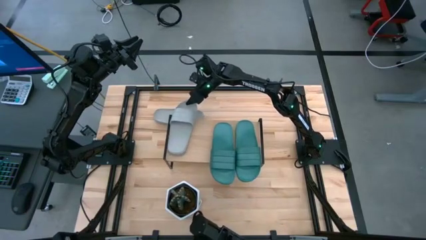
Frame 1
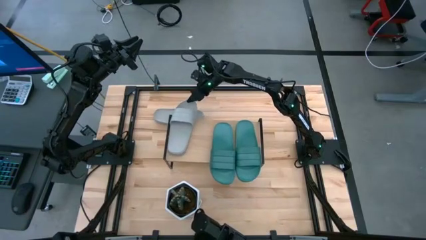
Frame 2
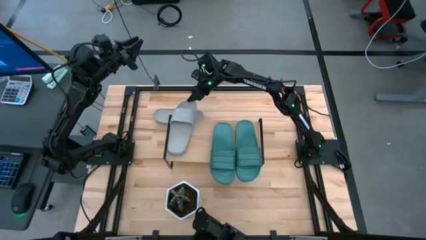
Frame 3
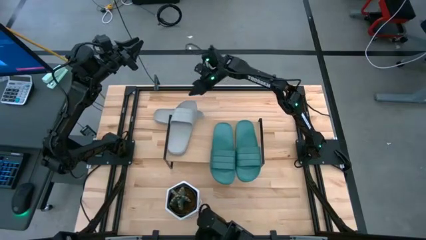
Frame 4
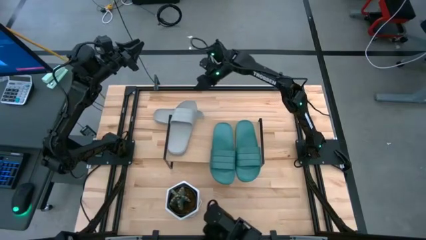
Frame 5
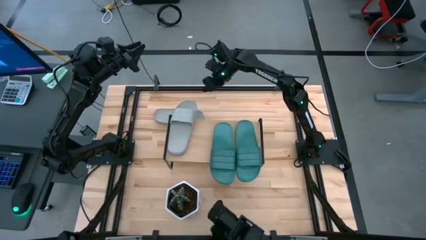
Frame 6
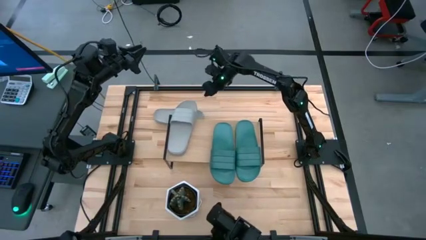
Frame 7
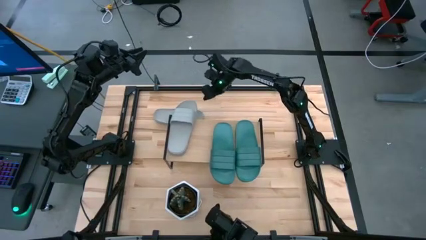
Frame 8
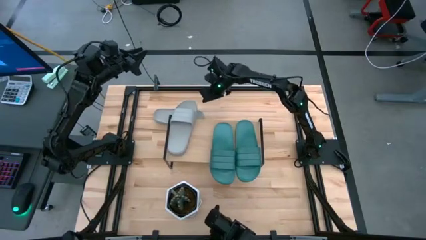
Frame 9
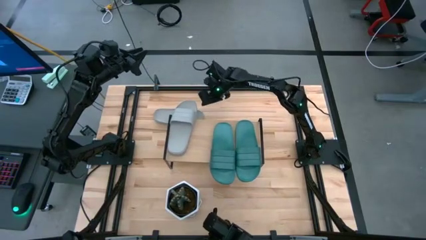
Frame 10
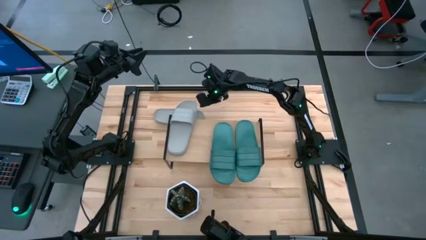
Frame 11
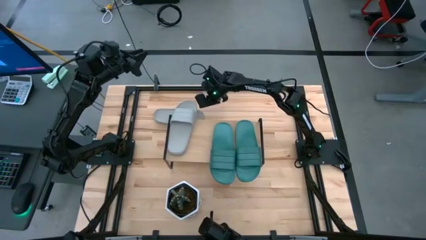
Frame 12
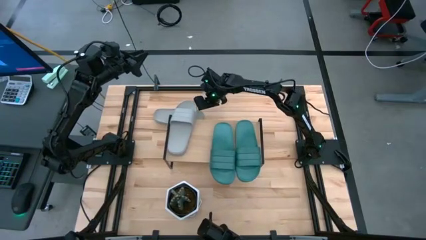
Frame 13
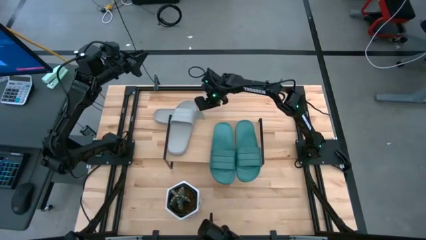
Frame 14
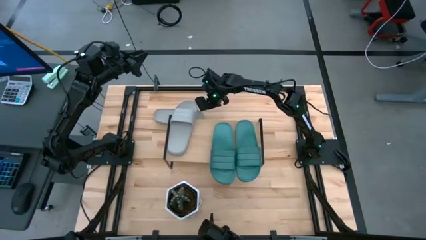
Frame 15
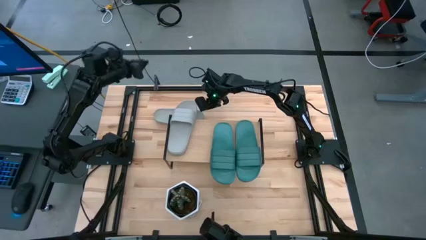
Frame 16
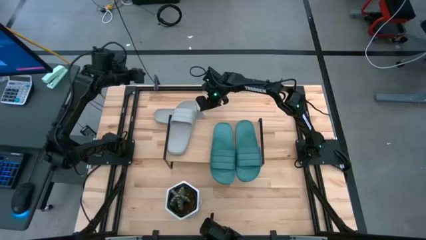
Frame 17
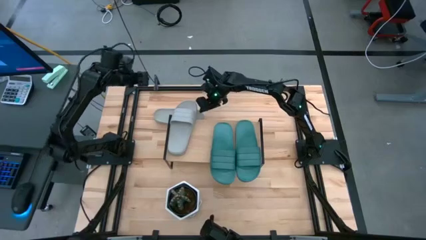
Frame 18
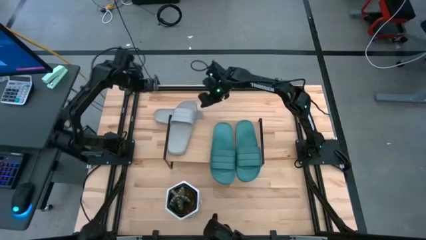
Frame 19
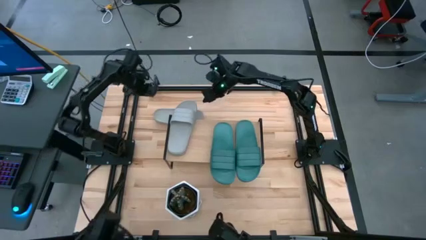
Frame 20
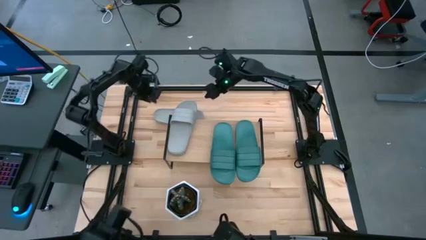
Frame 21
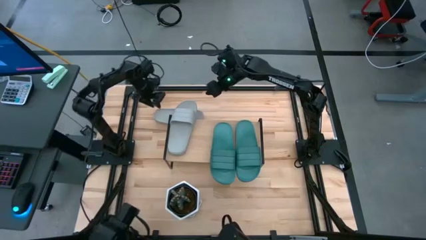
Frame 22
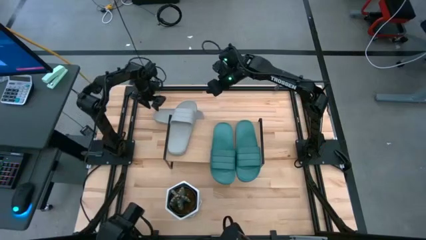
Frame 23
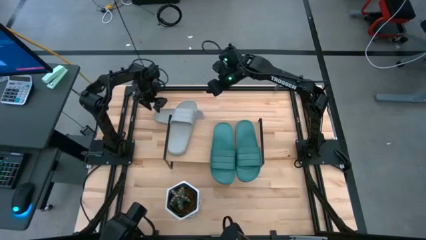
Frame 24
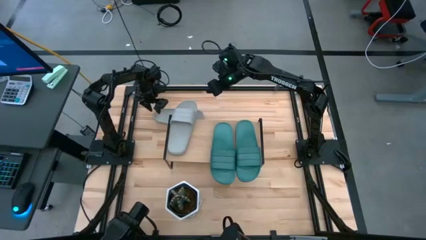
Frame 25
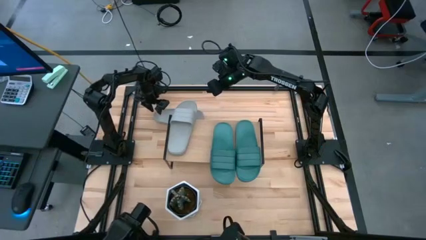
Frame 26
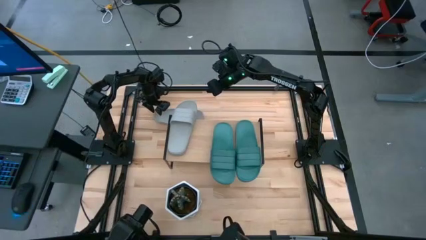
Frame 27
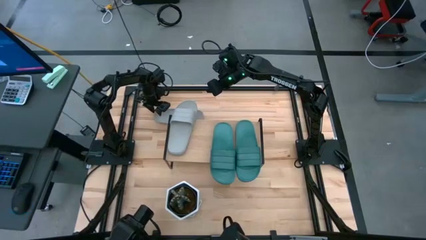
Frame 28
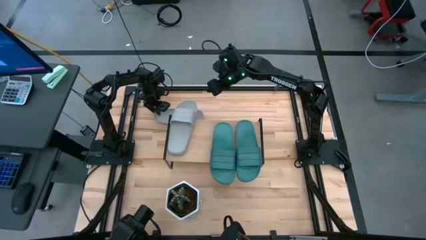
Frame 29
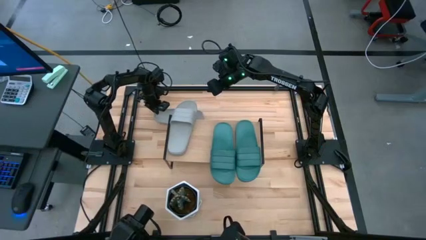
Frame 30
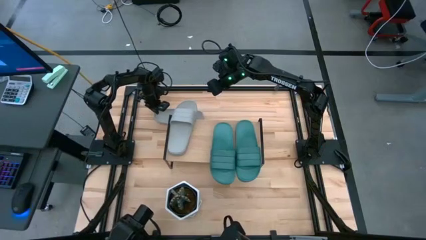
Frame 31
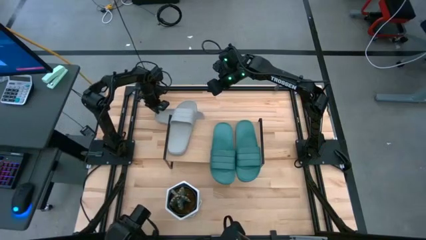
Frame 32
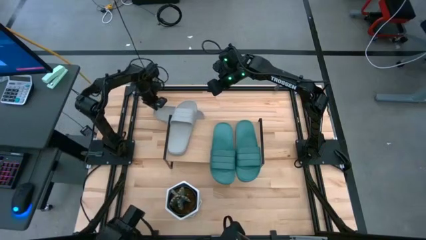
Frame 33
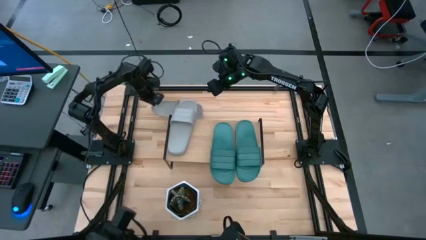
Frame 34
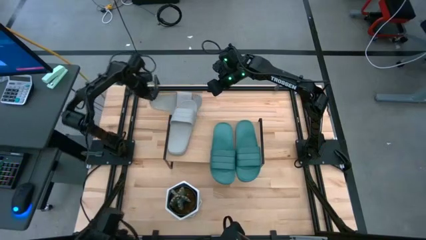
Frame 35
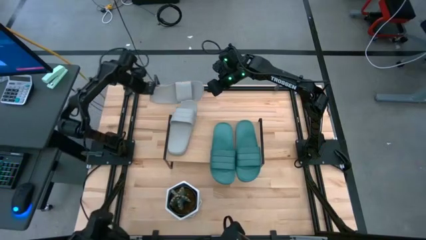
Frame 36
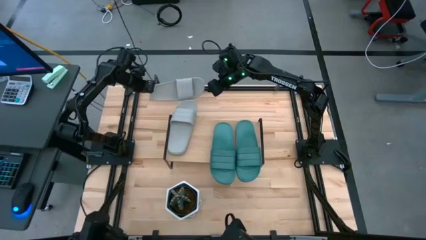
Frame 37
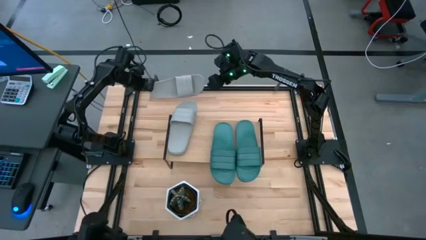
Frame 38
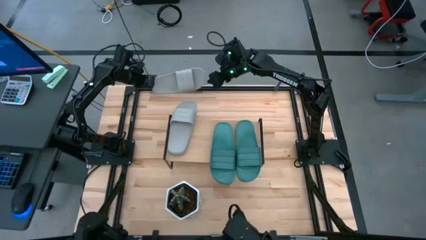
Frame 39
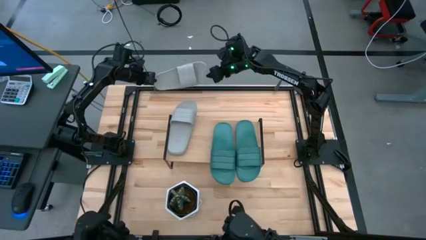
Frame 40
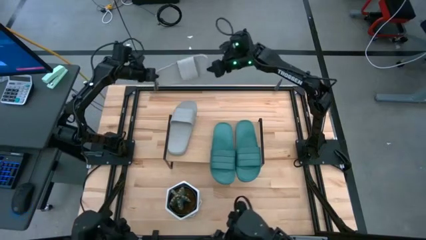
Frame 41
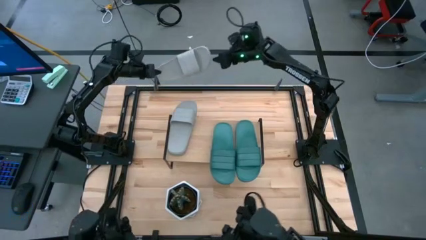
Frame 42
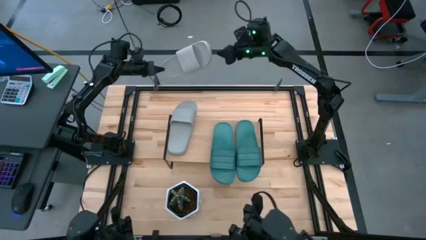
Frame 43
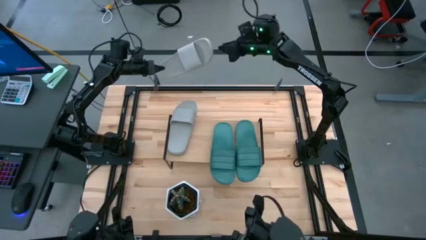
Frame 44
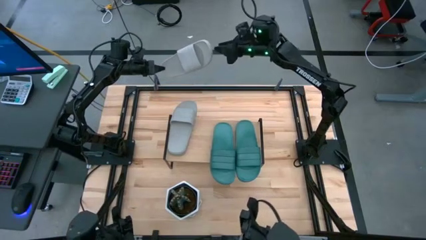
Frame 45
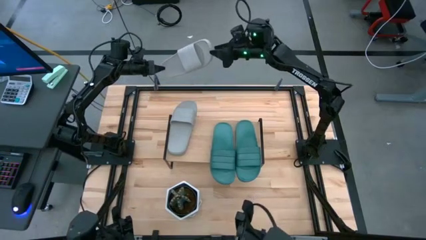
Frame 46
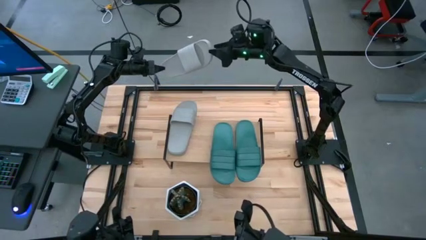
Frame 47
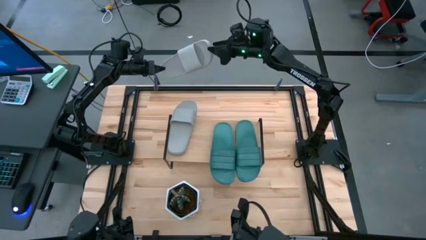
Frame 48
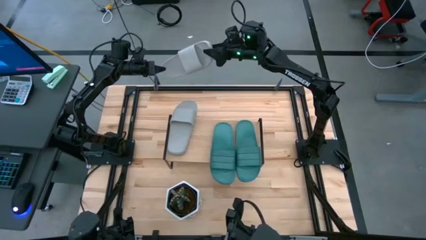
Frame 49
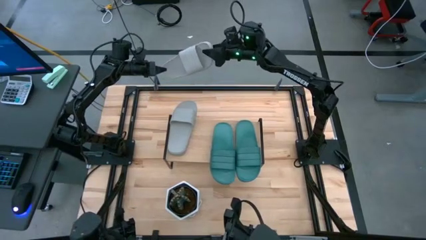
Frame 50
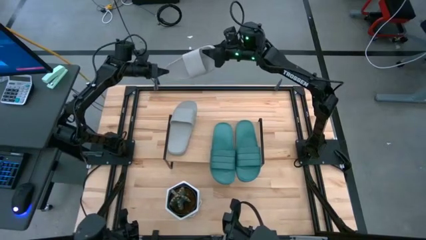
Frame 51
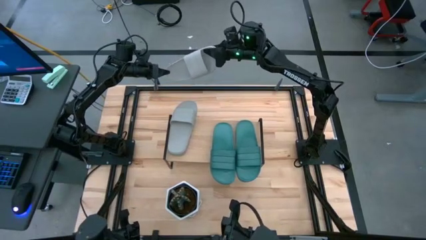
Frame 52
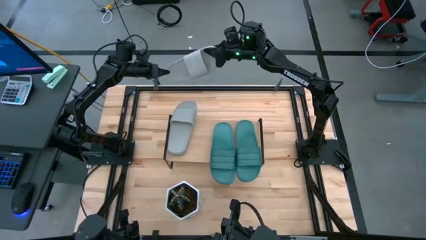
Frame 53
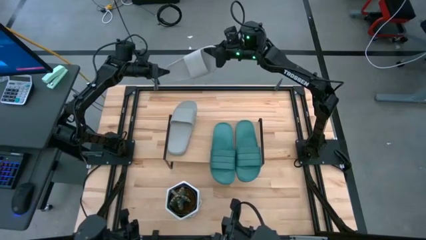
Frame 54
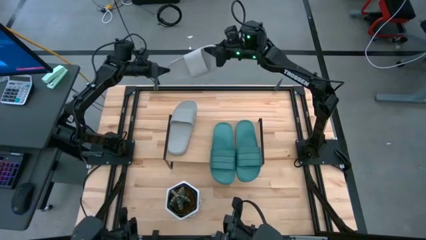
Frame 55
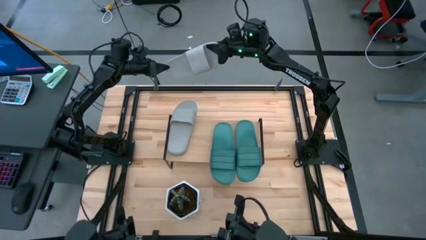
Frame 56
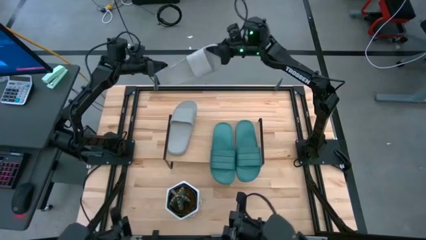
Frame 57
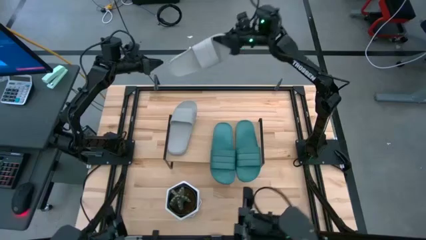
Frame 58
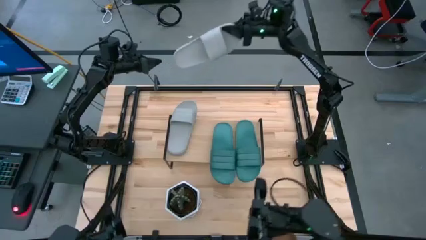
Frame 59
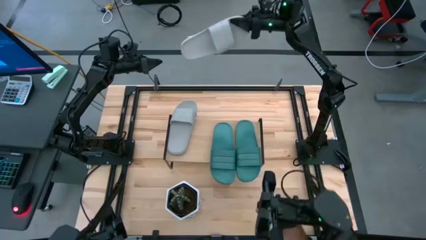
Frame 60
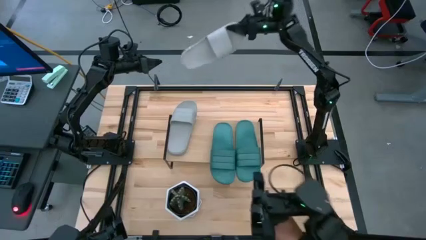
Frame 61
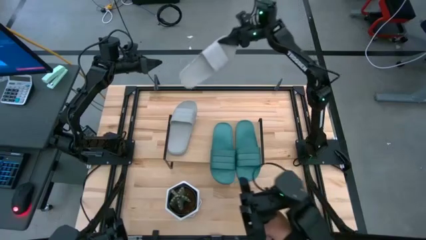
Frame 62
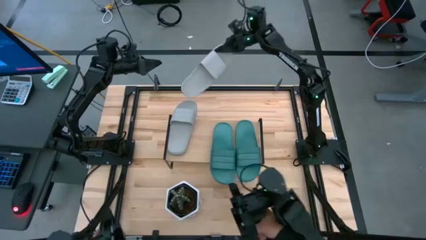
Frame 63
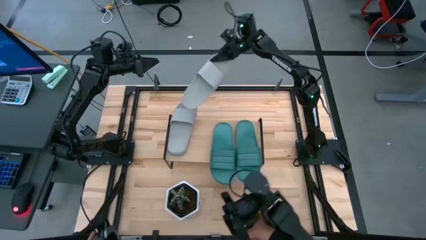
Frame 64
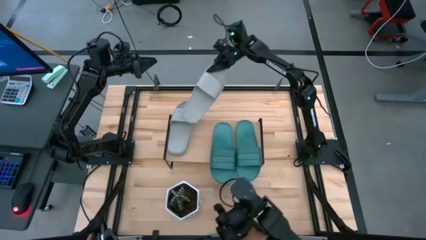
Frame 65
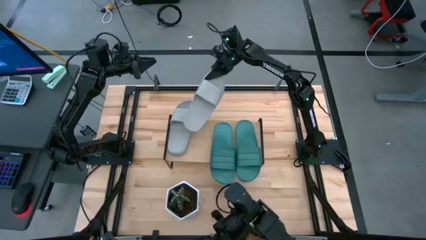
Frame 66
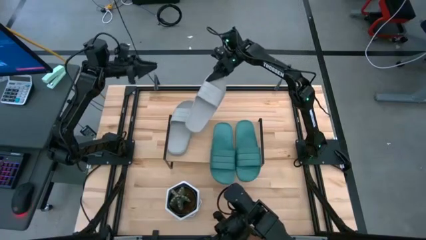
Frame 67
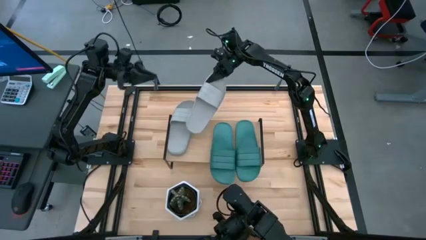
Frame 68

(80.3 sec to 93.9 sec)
Task: Pick and place slides into the shelf
Put the gray slide on the shelf

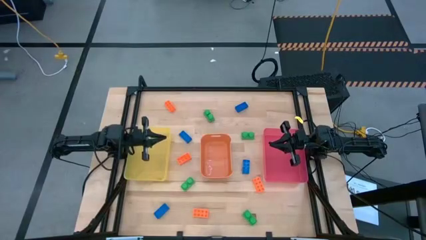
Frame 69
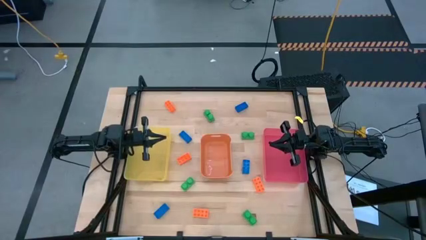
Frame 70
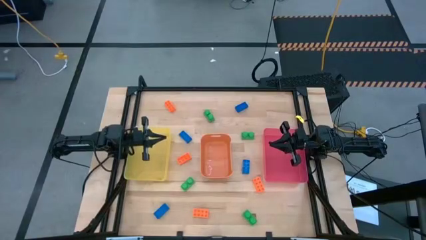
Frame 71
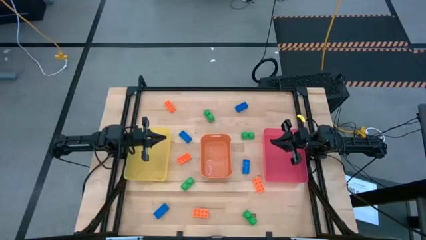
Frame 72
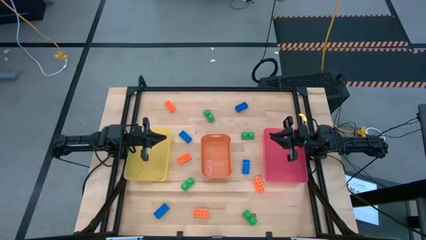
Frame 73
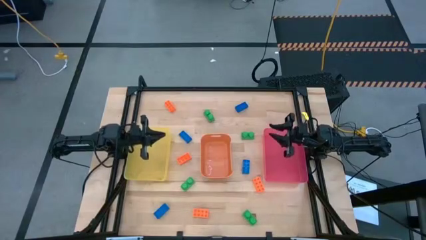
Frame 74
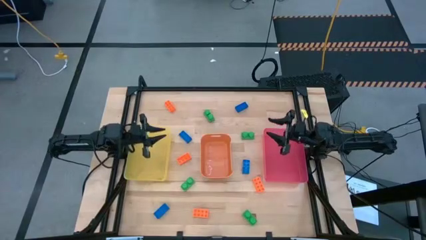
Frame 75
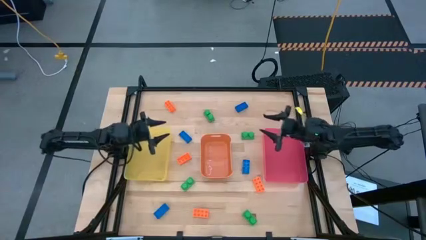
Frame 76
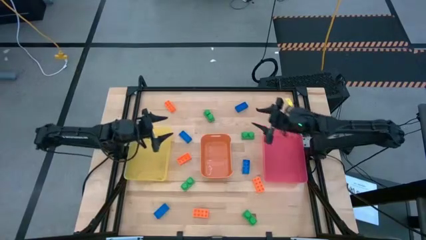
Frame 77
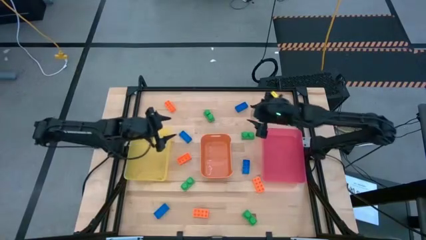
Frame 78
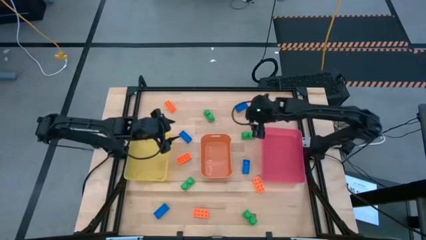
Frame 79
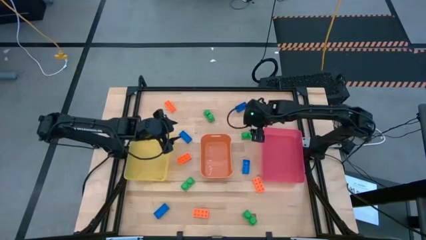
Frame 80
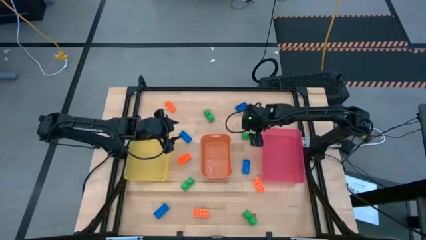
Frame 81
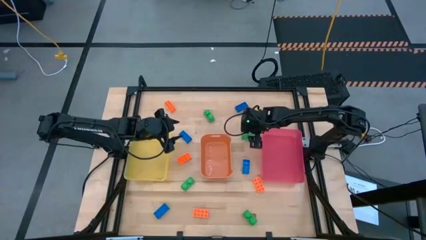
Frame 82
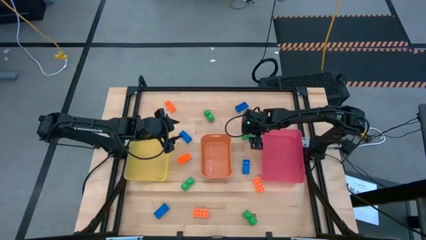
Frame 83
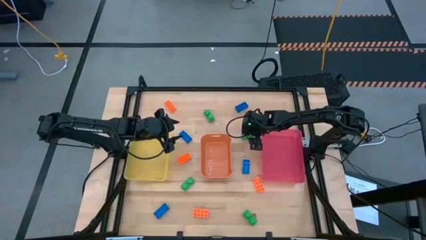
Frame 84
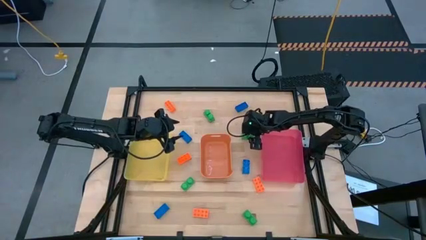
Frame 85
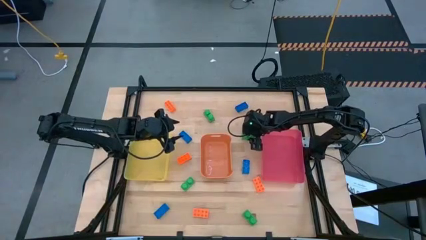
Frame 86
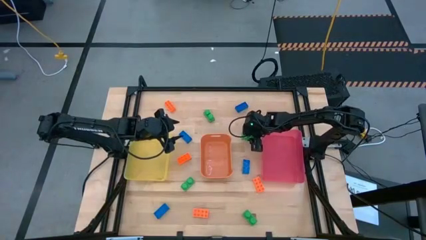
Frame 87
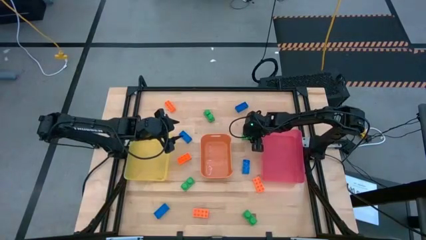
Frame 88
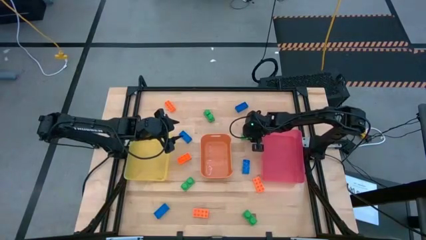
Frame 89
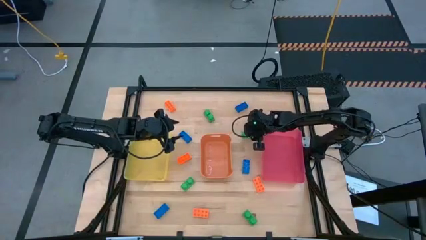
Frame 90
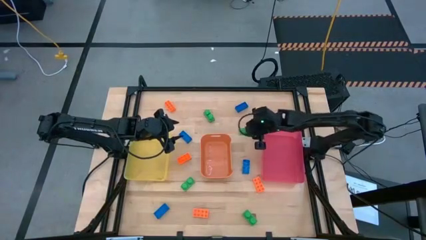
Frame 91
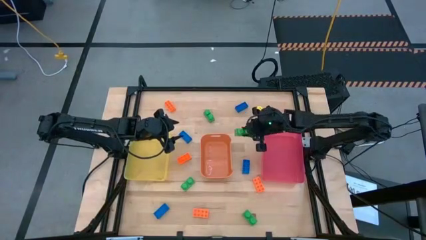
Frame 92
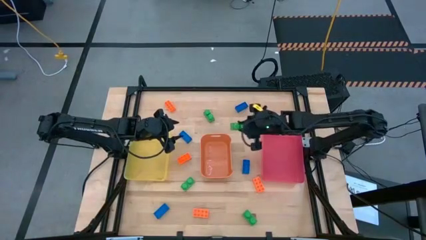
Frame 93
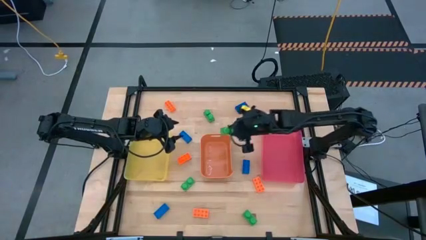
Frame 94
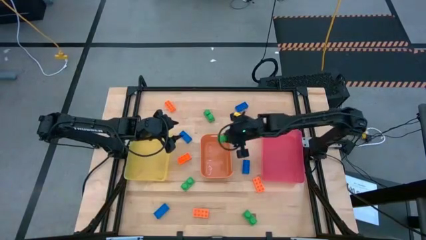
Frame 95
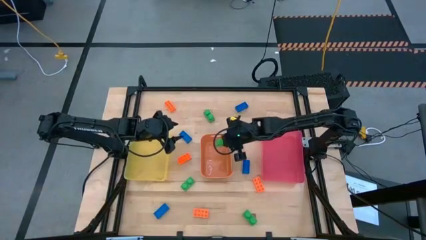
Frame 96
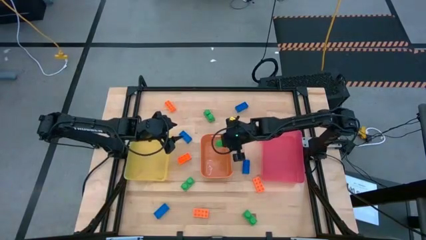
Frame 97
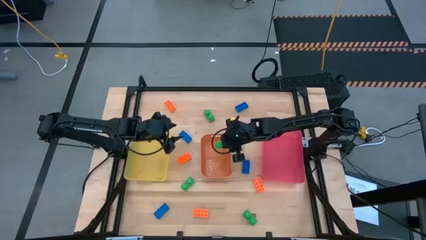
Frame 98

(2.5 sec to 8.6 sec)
Task: Sort & place blocks by color
Put the green game piece into the orange bin
